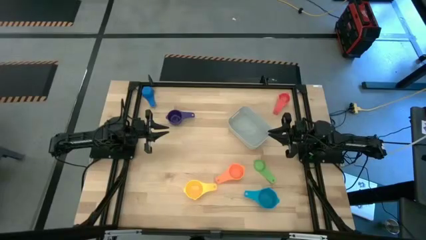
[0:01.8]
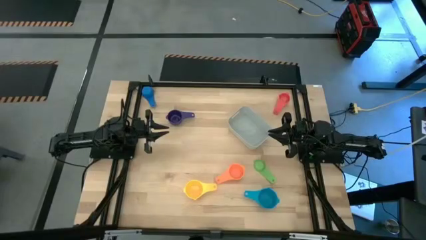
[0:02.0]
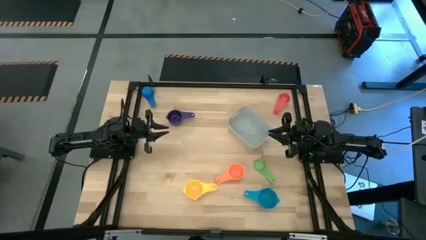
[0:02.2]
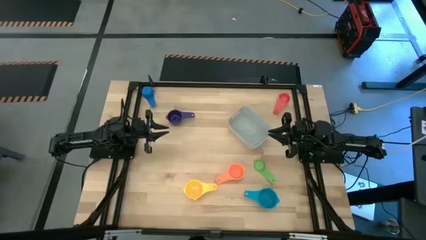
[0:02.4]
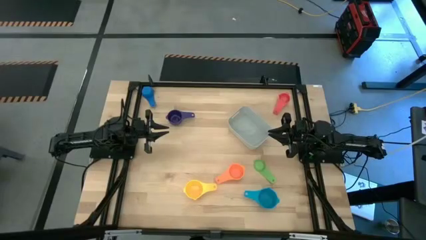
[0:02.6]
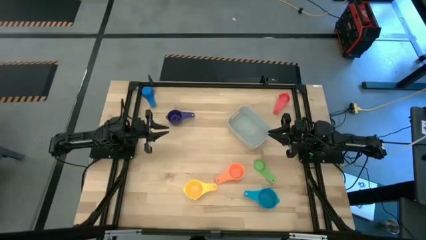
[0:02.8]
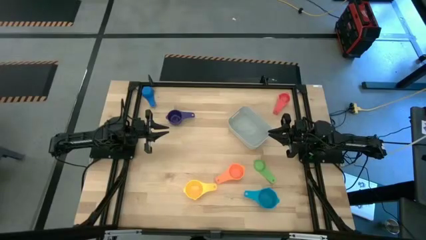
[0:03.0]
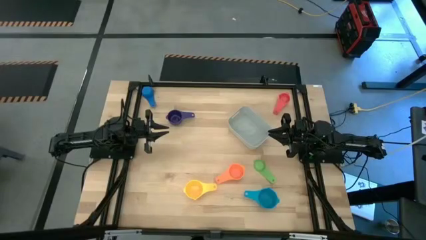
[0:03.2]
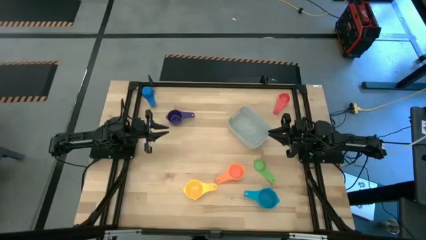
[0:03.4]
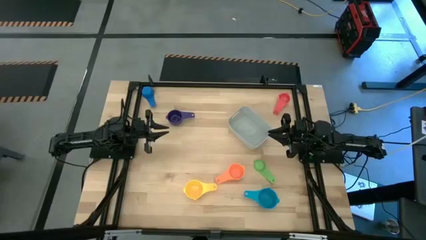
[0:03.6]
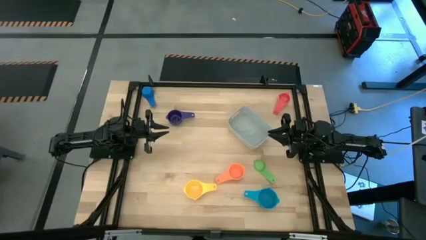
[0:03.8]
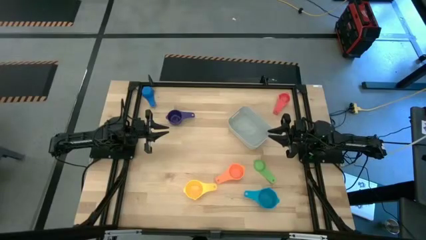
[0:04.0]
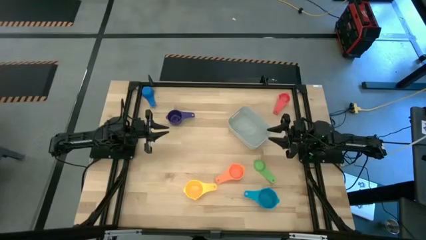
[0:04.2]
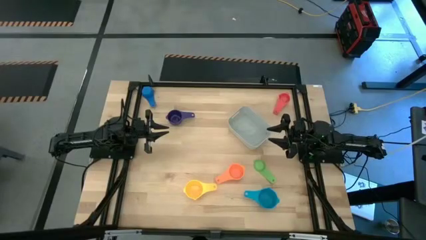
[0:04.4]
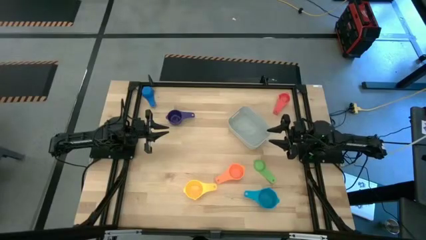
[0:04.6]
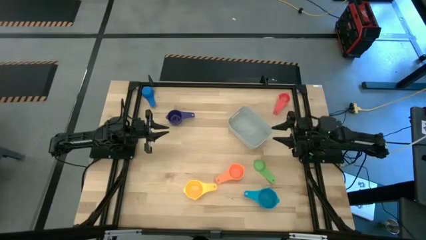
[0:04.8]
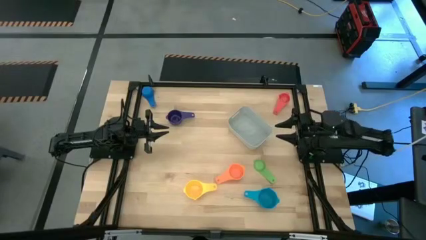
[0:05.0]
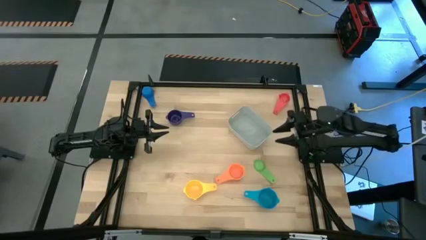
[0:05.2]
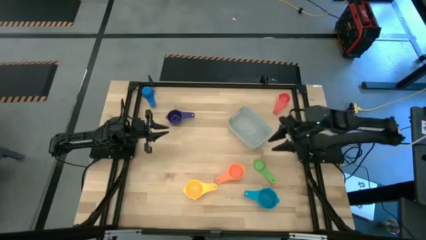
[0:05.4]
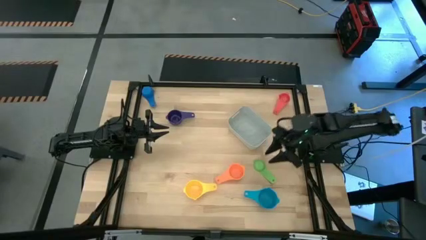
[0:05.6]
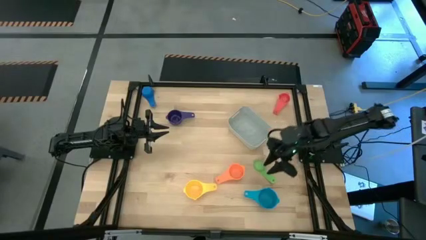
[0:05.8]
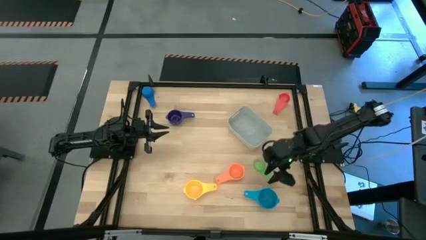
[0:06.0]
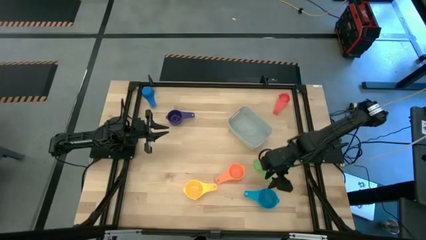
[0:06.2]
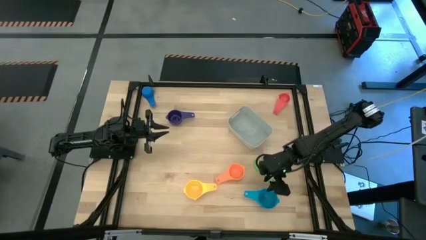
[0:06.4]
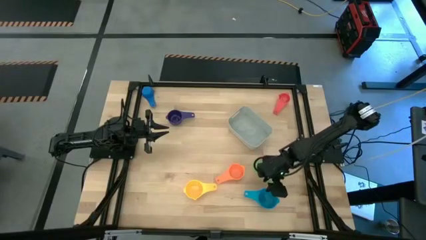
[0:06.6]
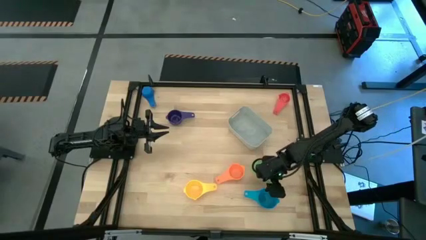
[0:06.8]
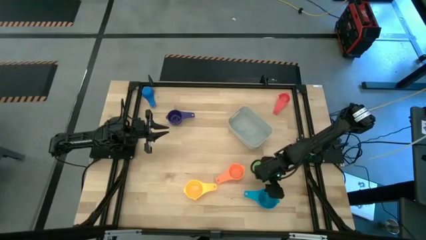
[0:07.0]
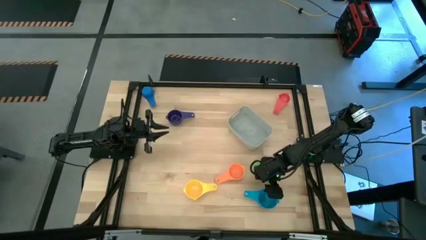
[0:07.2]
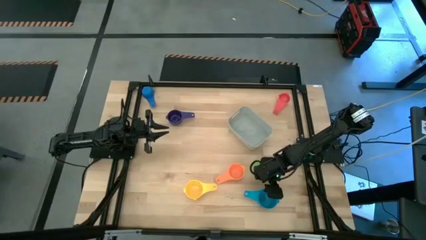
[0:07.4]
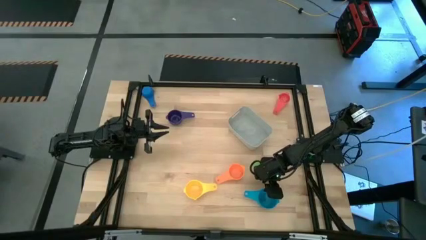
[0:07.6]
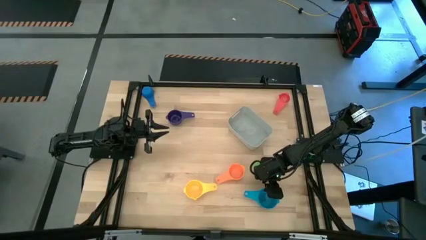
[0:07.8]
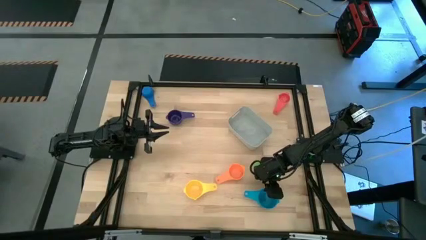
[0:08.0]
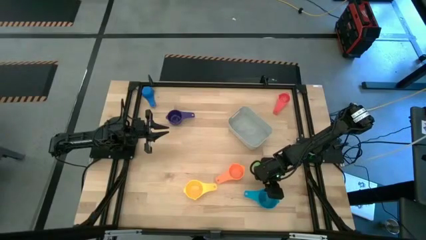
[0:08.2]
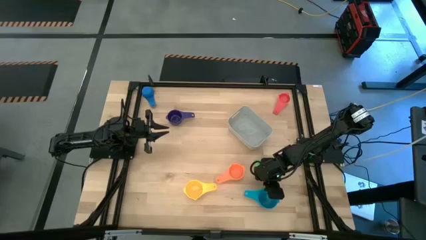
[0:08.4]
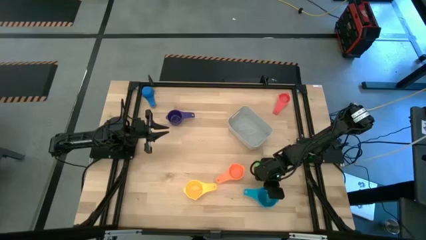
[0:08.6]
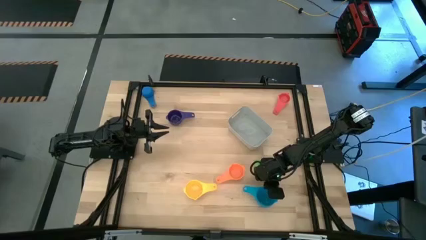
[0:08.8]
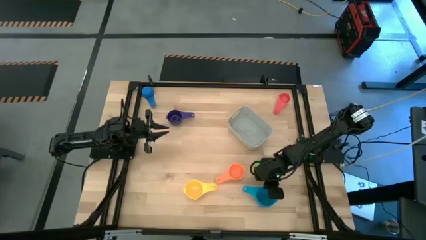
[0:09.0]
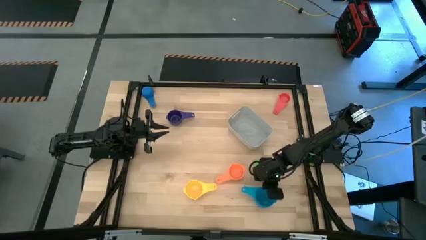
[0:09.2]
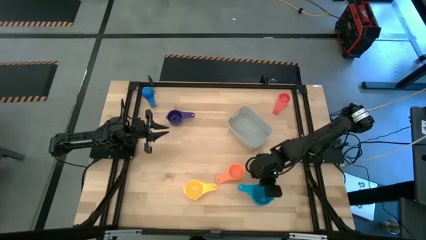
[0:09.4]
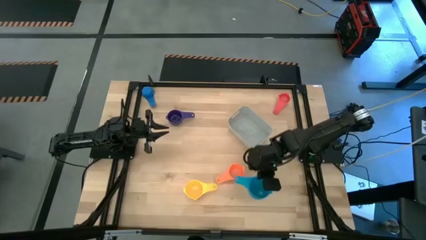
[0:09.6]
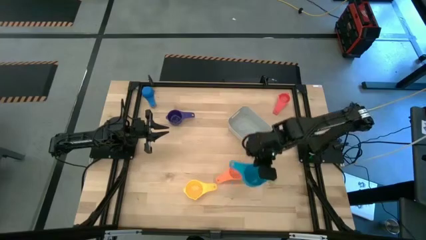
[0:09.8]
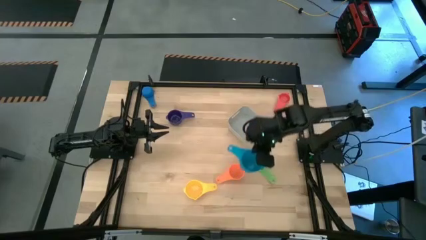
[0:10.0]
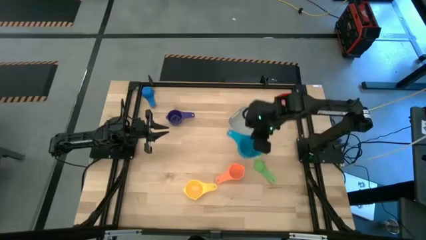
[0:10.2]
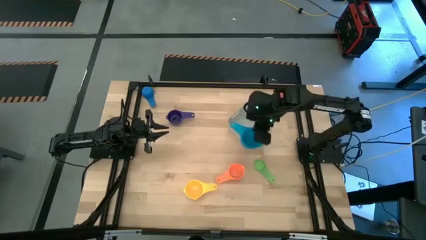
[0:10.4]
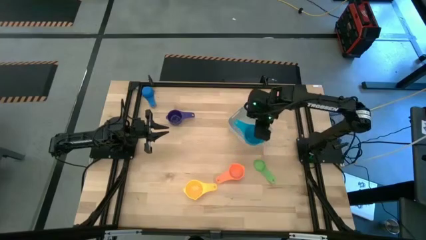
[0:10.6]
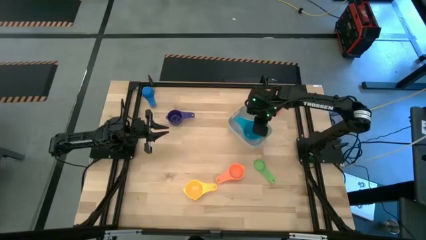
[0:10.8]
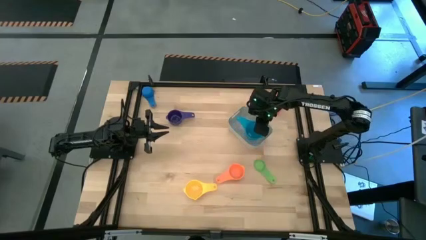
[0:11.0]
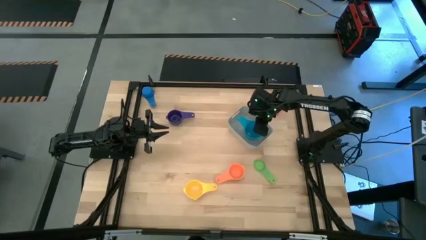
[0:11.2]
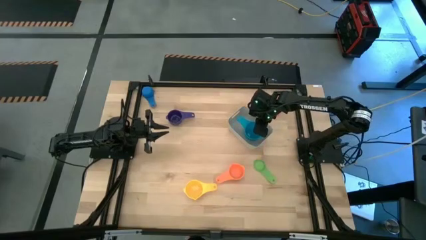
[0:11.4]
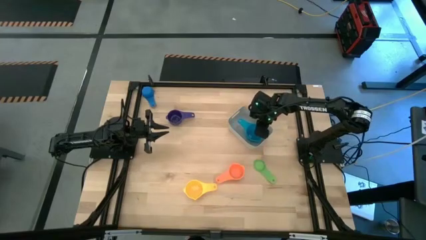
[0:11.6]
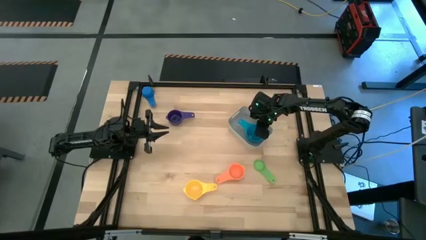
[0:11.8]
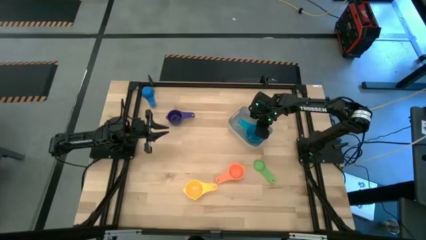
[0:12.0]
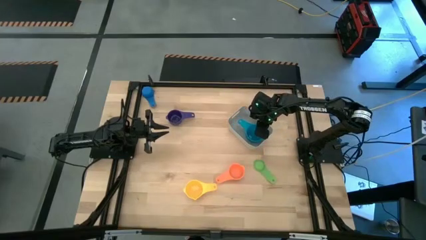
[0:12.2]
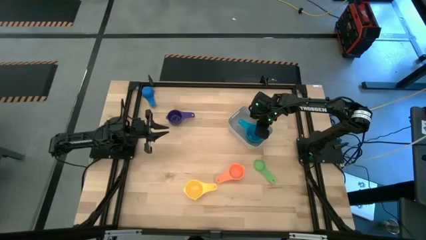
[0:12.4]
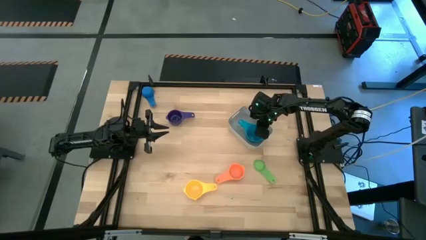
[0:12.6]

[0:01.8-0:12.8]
Task: Nest measuring cups in basket
Put the light blue measuring cup into the bin

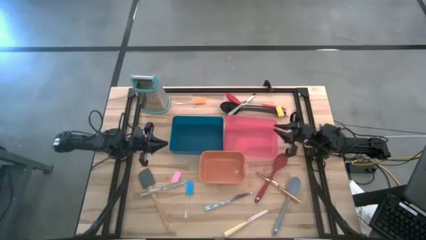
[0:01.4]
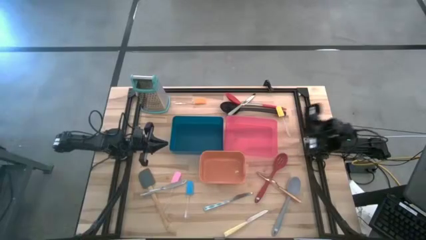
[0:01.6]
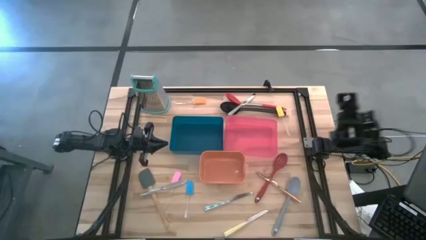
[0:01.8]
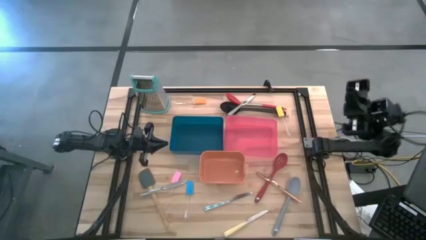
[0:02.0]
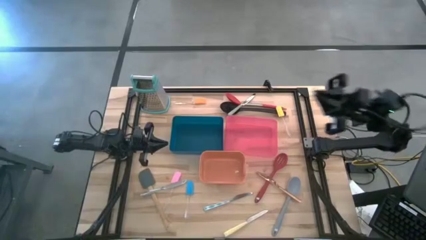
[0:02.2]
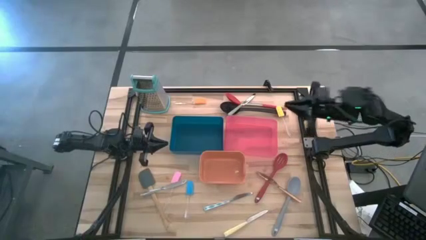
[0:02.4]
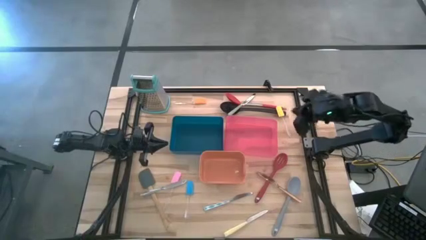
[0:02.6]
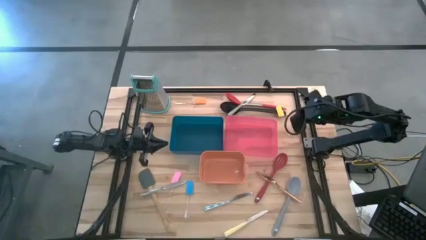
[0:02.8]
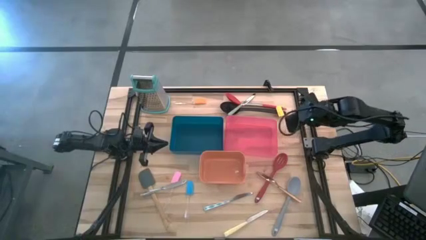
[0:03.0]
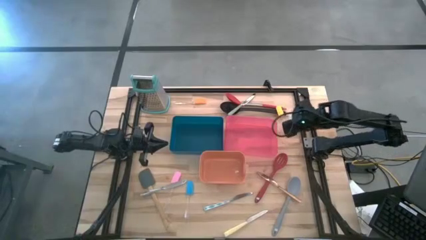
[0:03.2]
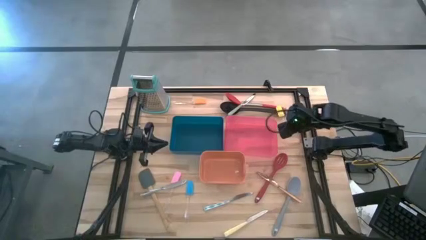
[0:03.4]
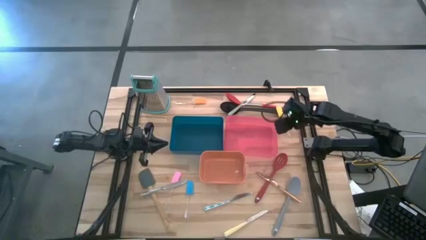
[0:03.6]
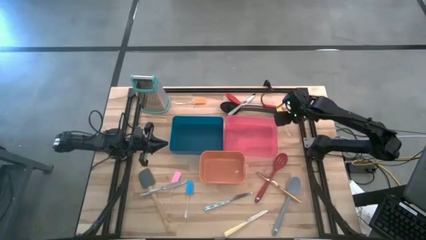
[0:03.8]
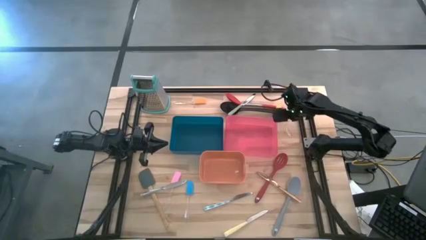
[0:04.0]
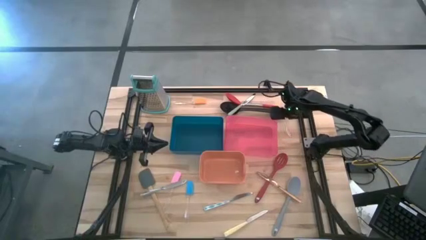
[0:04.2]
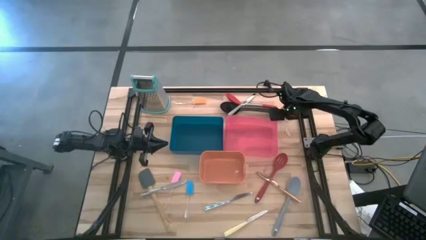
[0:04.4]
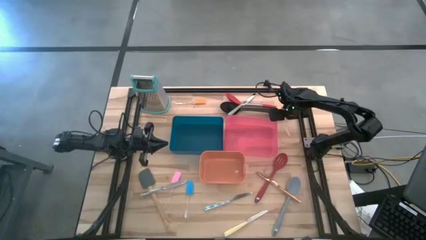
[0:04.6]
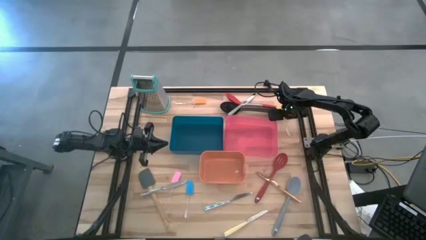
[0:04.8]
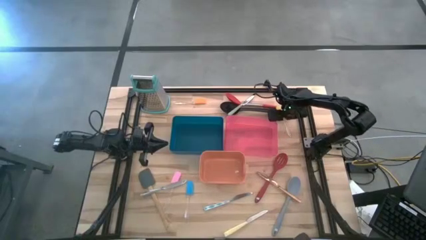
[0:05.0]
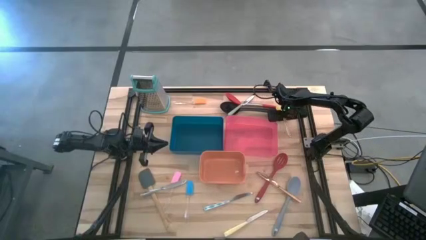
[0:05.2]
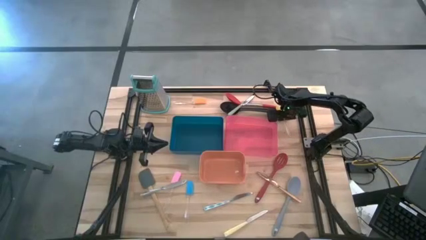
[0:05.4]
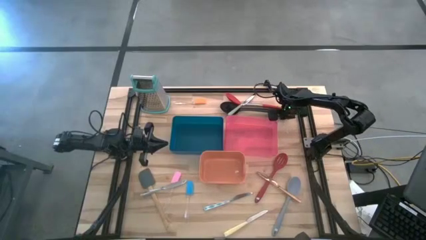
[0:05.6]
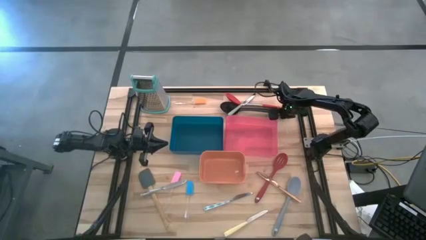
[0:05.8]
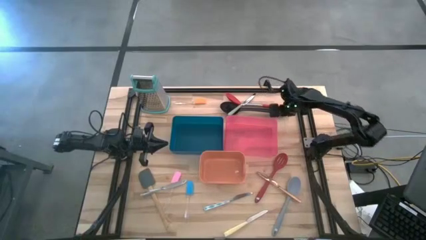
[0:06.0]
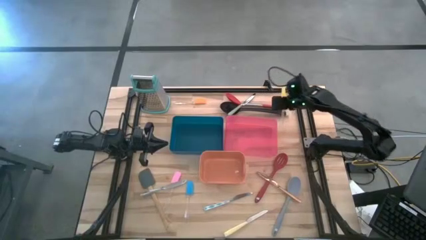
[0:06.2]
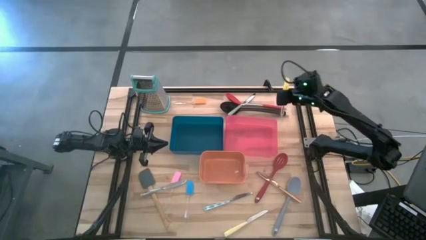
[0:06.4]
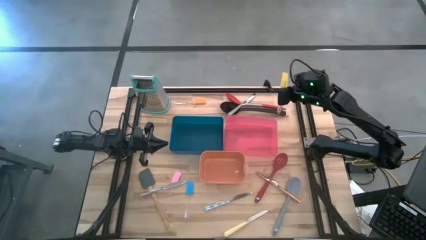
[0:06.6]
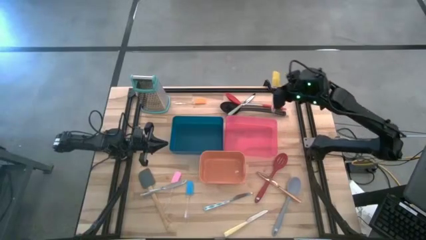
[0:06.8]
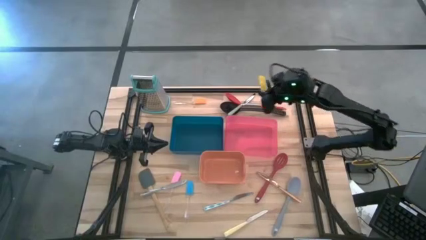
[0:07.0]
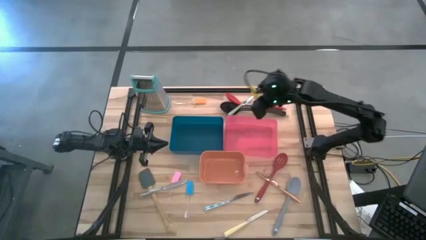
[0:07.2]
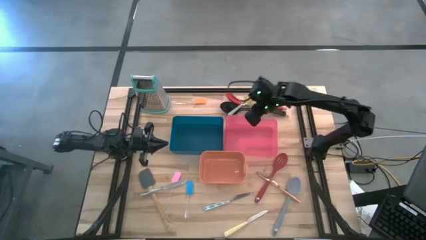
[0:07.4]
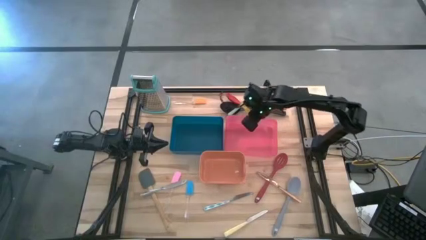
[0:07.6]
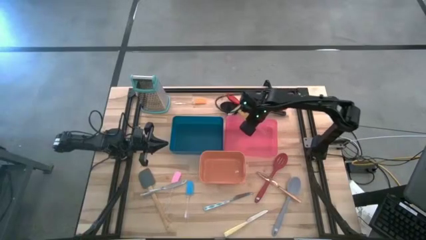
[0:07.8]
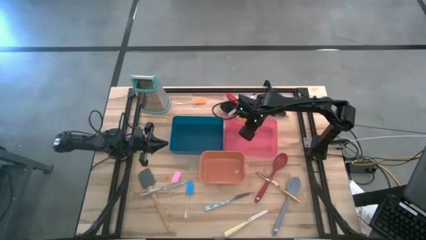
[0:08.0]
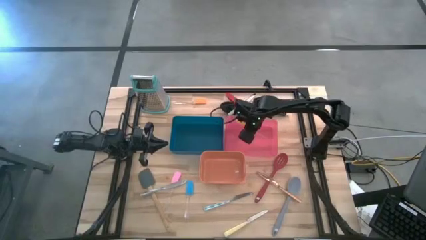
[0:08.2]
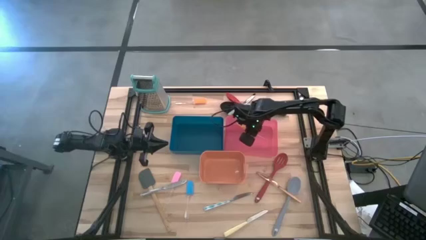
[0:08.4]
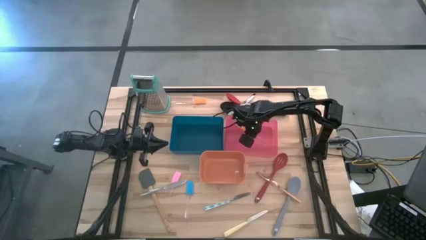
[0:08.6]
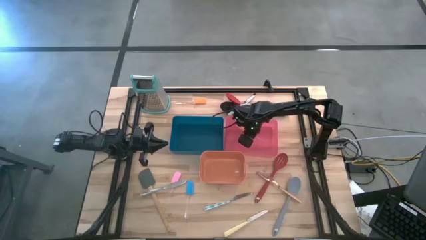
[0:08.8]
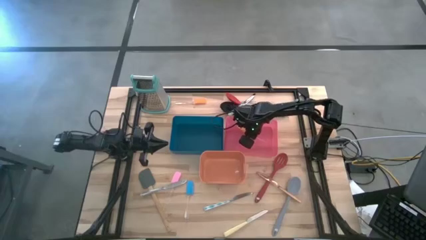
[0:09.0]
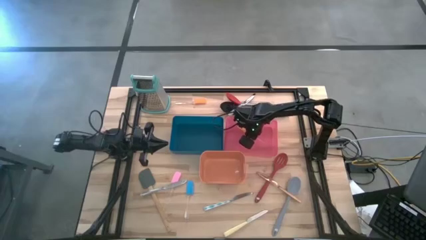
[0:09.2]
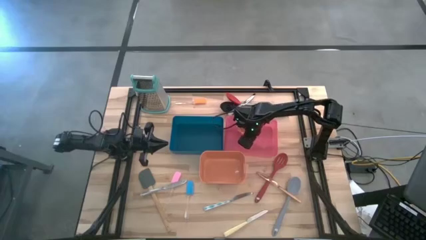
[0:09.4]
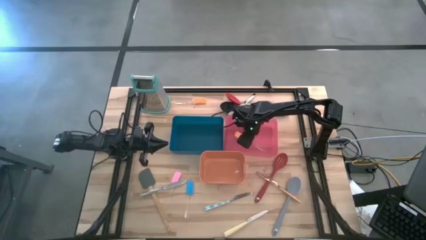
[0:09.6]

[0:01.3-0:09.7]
Task: Pick & Place Kitchen Items
Put the yellow spatula into the red bin
